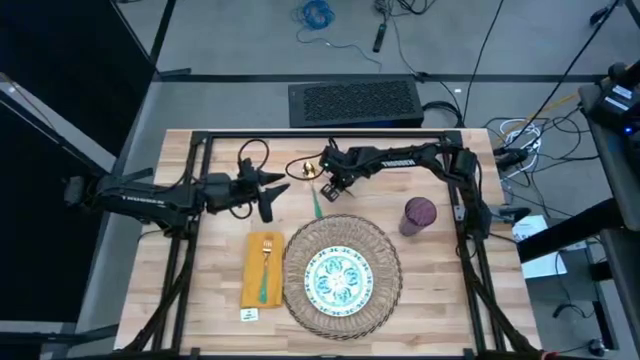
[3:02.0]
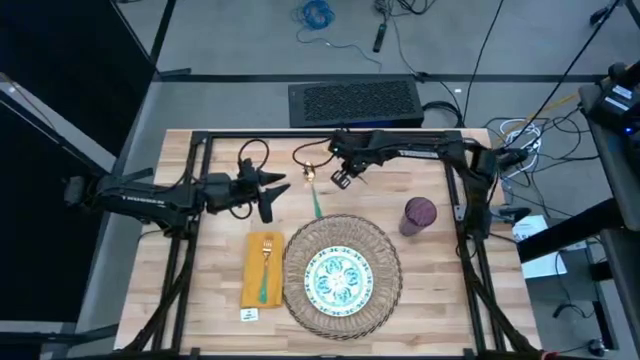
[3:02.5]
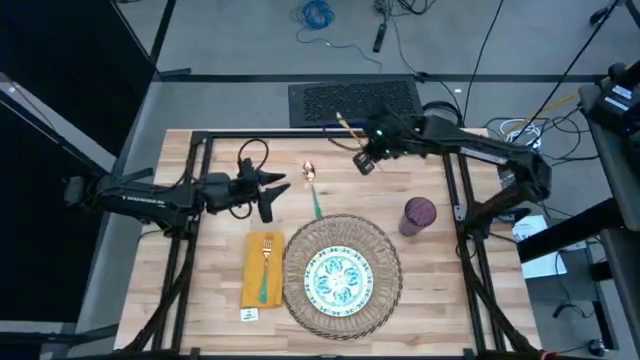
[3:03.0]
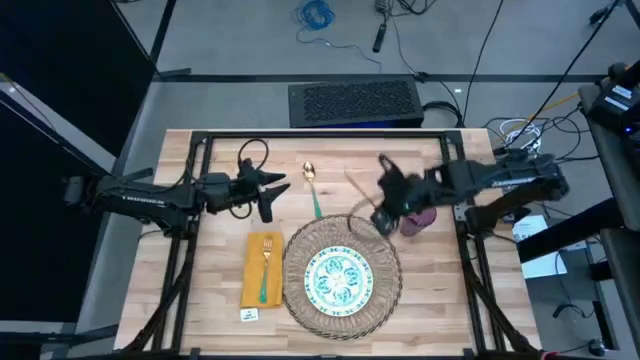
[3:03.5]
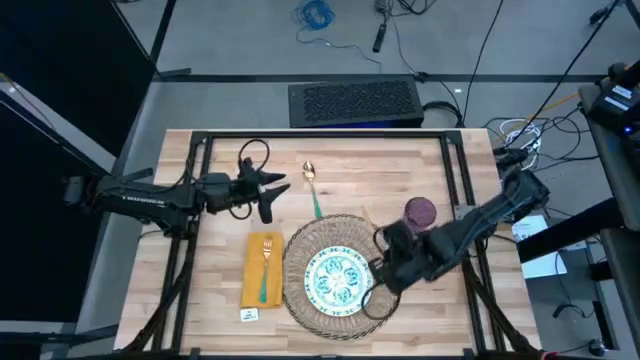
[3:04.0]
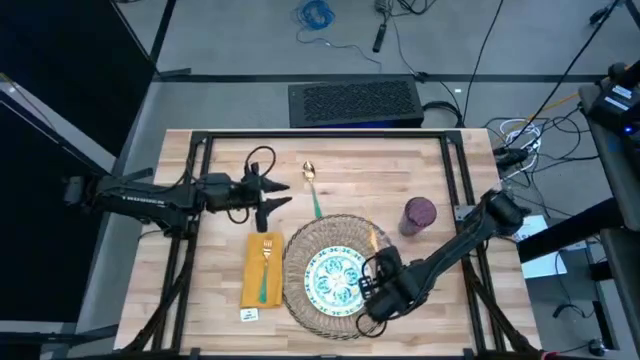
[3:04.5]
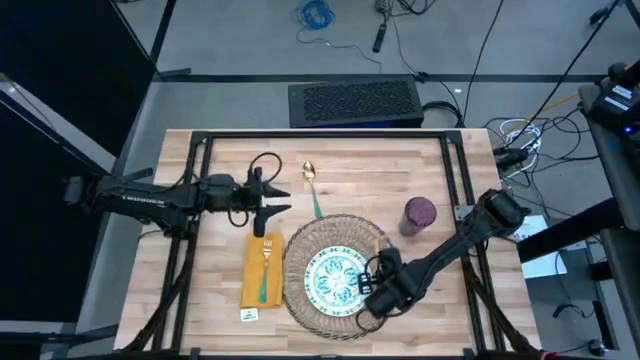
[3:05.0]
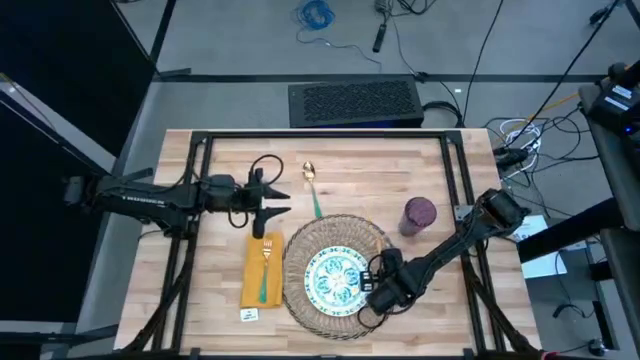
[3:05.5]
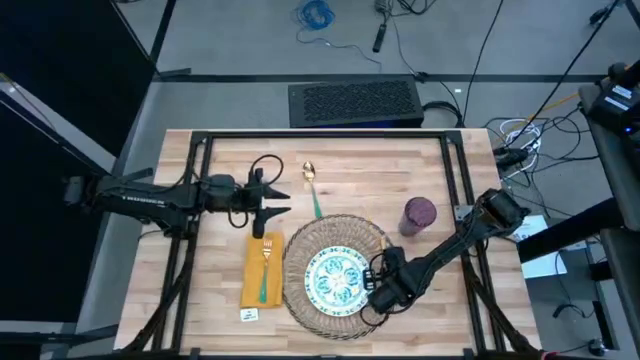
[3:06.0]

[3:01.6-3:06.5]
Task: Set table place
Put the gold table knife to the right of the white plate on the brown table mat

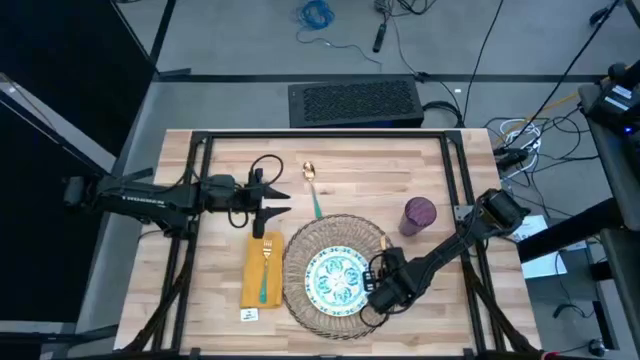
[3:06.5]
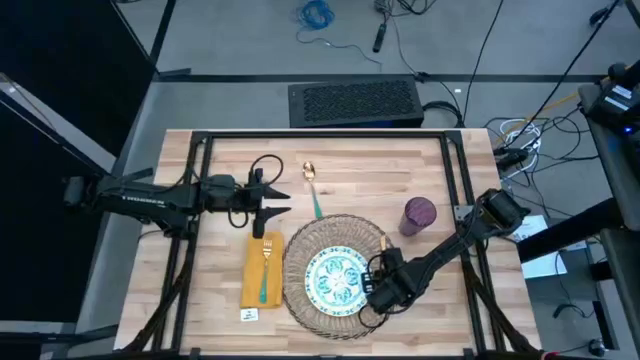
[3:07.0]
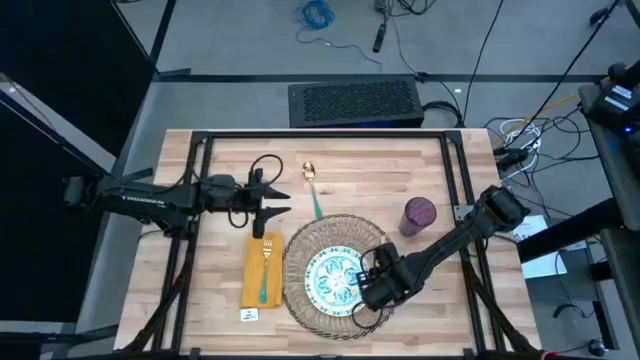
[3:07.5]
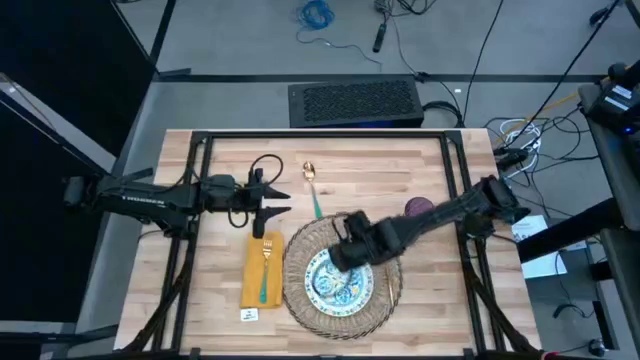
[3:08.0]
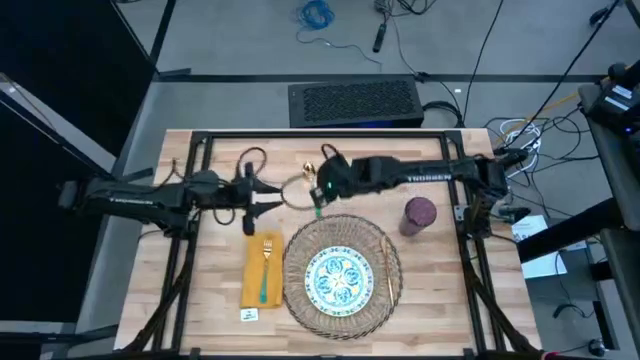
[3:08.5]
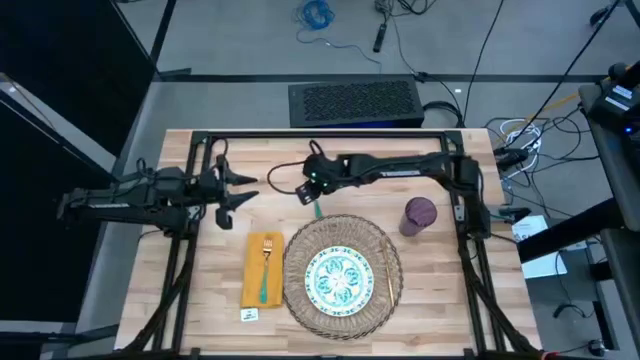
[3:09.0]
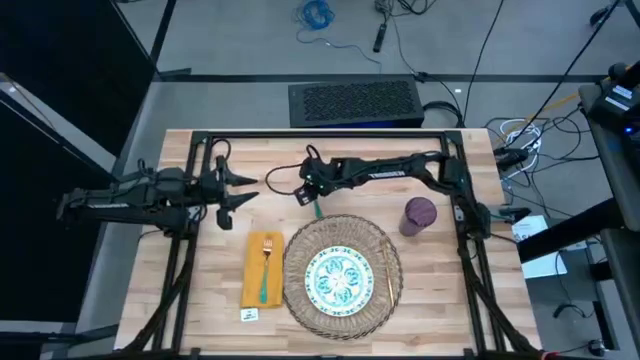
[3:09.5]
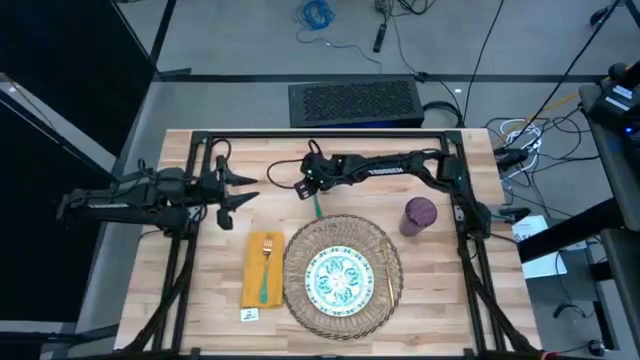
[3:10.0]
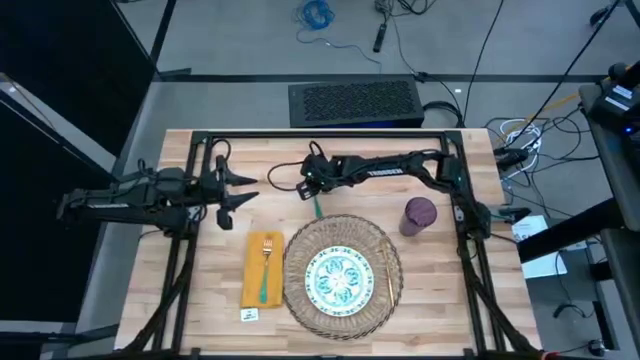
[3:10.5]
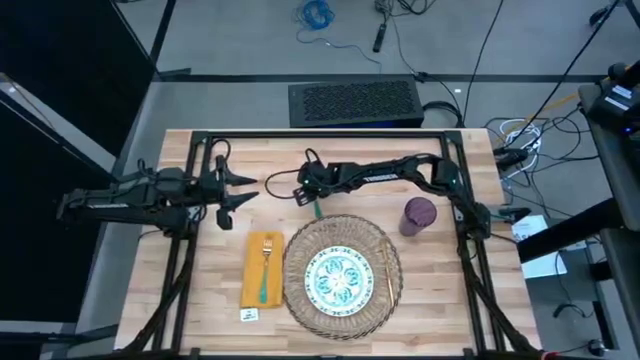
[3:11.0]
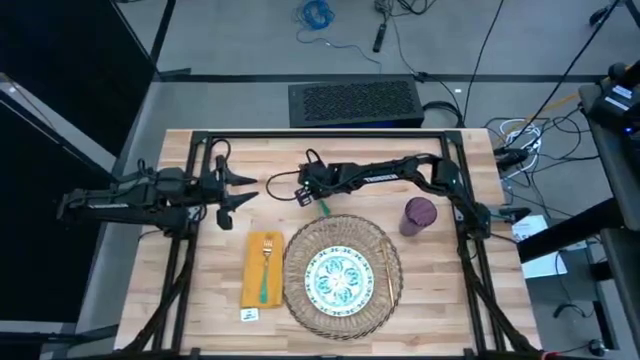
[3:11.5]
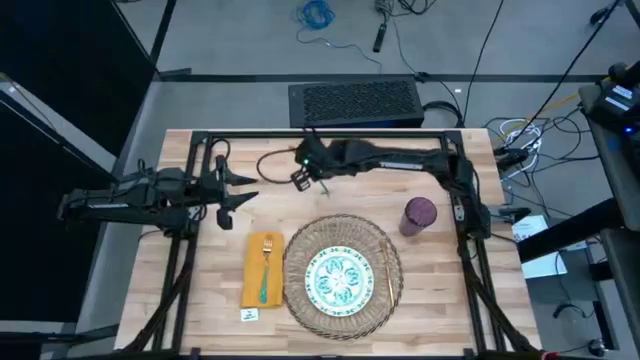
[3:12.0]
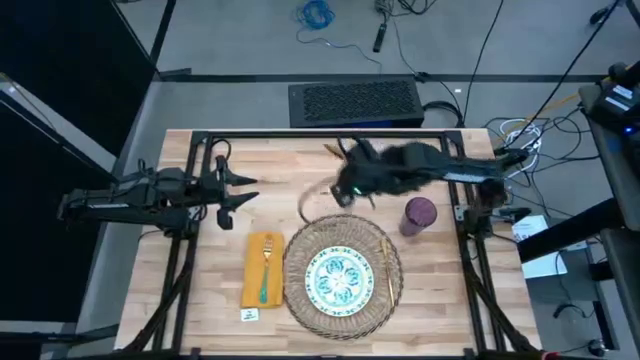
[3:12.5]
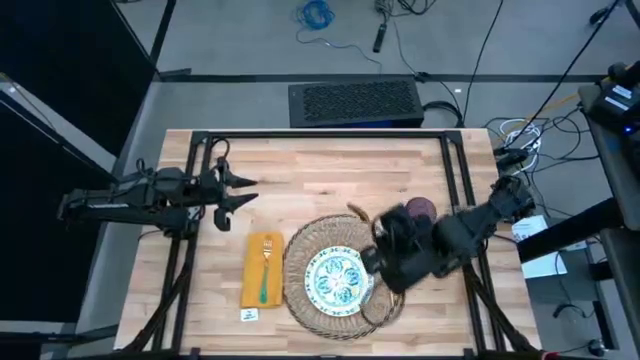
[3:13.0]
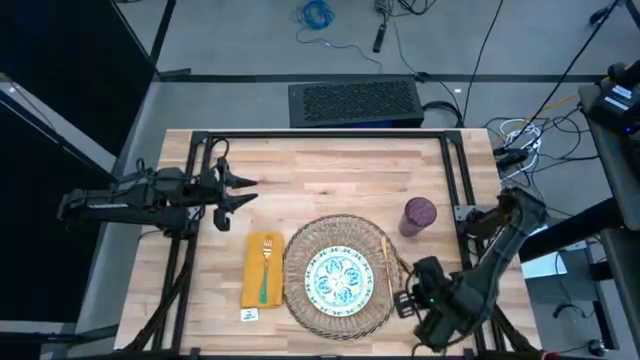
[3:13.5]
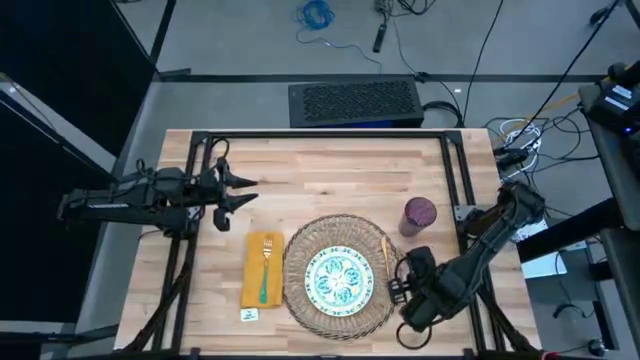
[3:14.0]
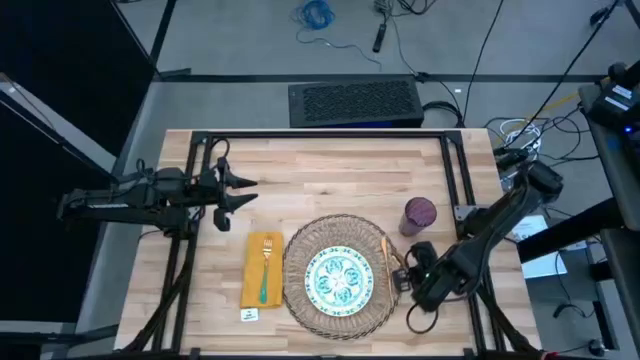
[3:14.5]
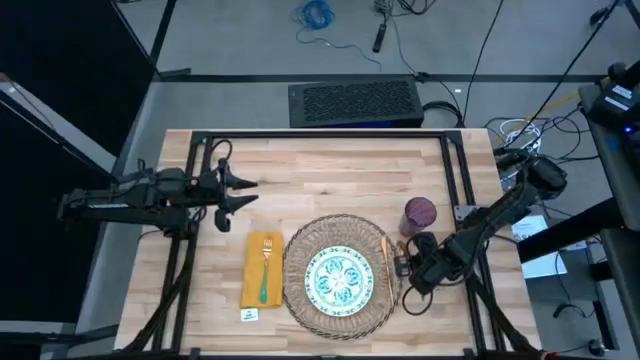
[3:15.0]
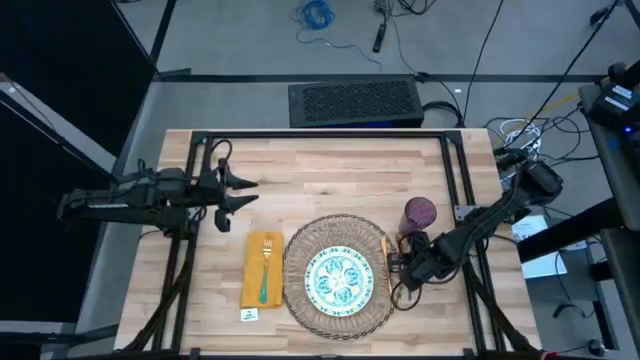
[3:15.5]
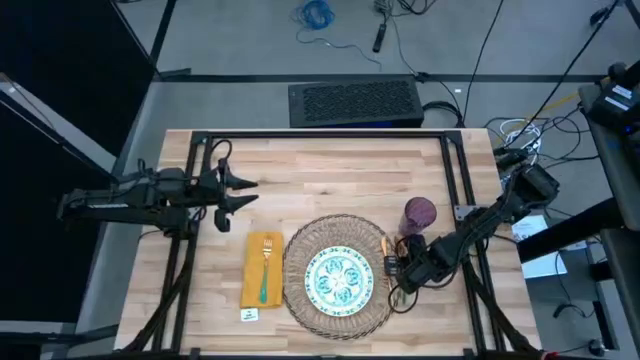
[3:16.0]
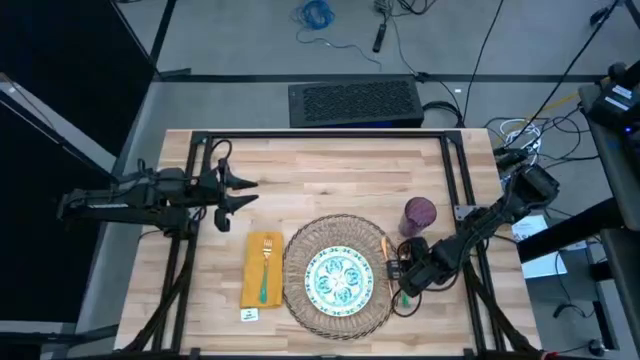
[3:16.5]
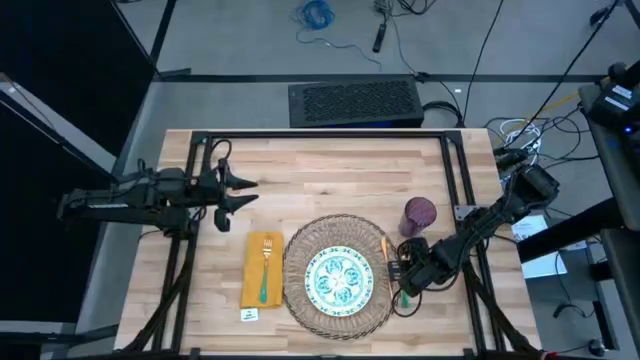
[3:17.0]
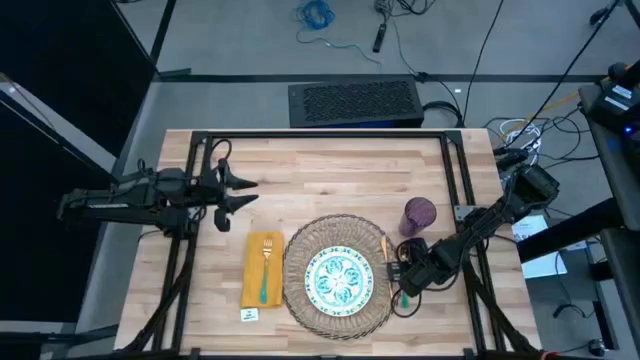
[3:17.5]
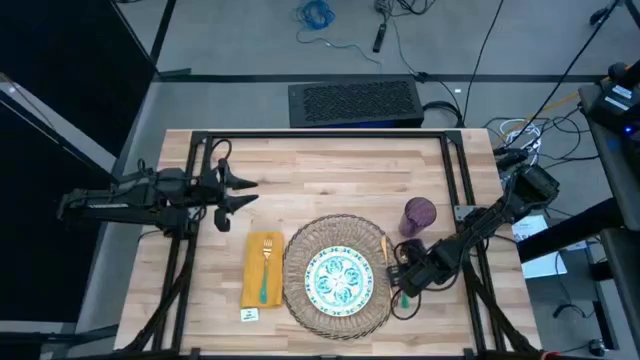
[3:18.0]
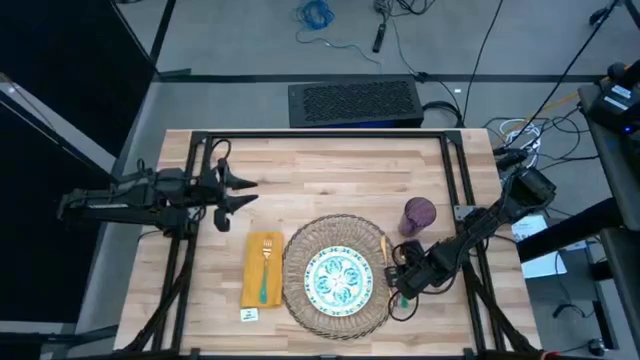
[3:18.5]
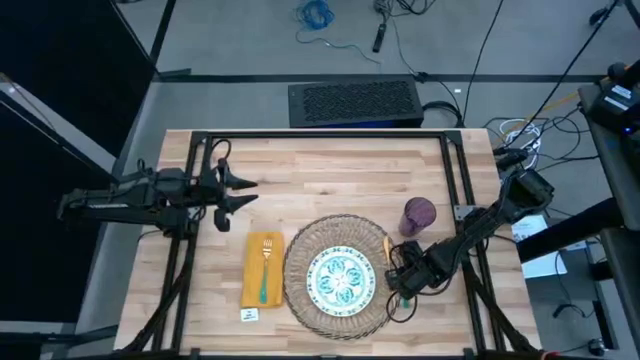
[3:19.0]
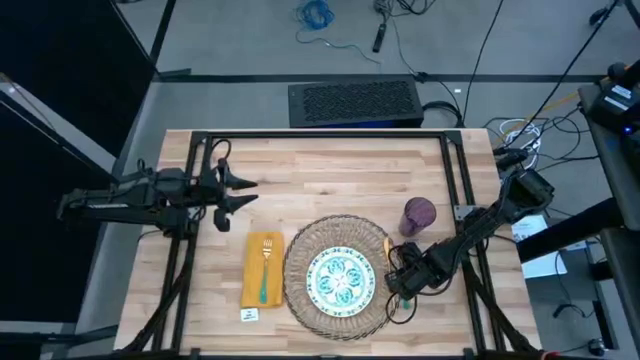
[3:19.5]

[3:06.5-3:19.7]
Put the green table spoon to the right of the gold table knife on the brown table mat

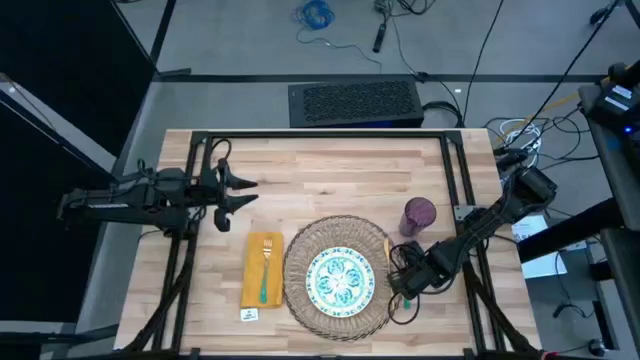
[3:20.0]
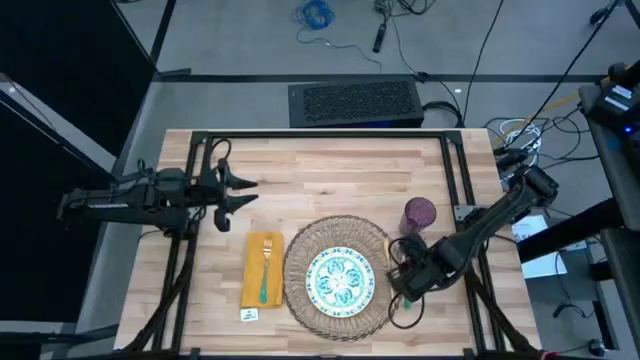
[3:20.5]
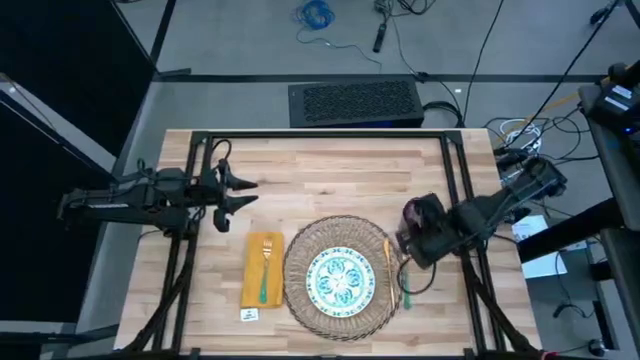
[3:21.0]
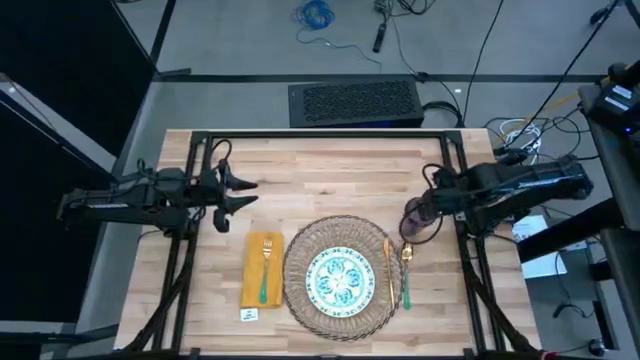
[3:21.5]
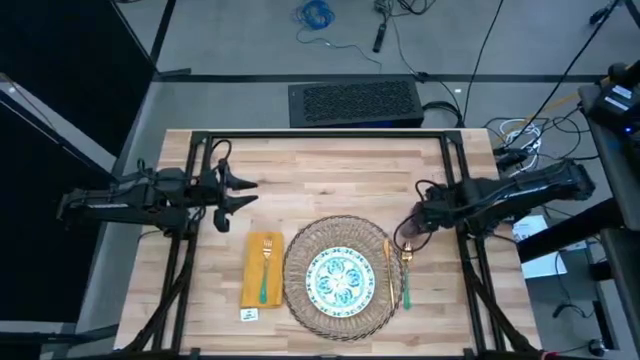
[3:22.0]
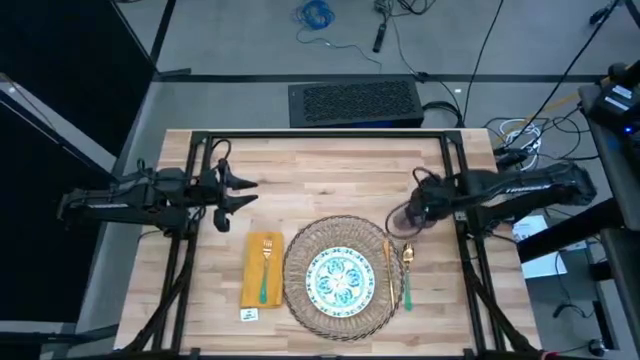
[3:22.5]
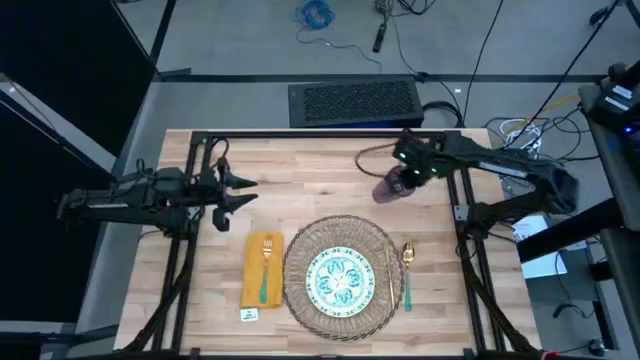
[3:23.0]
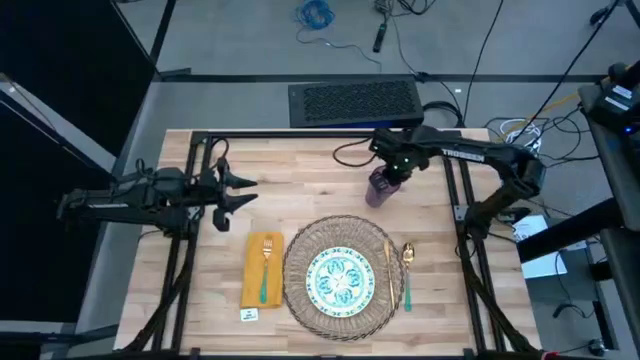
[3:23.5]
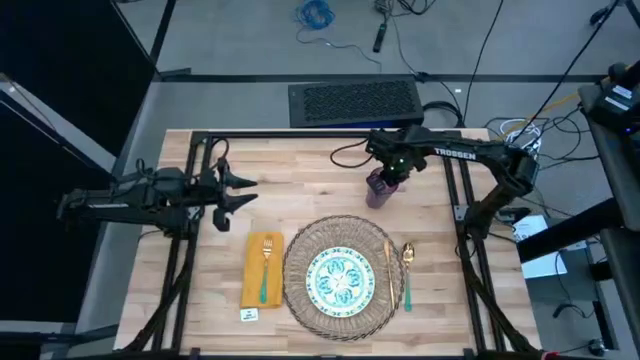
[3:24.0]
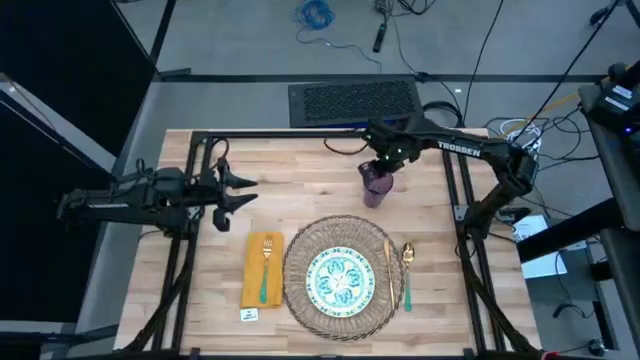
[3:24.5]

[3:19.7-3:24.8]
Move the cup to the top of the brown table mat
